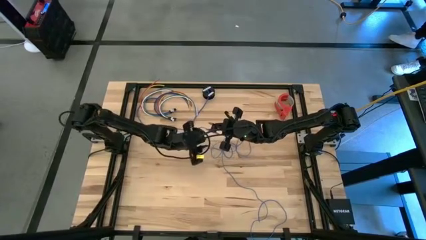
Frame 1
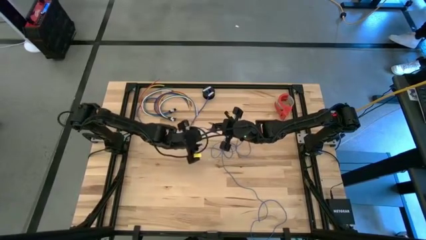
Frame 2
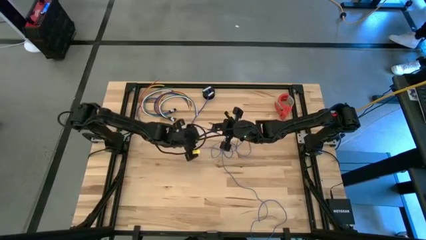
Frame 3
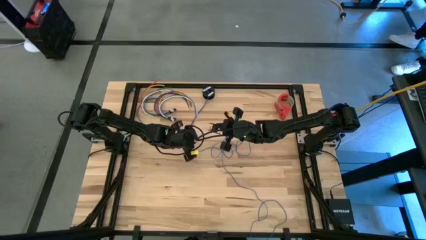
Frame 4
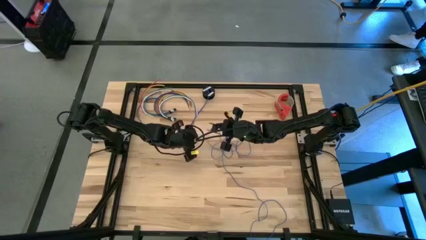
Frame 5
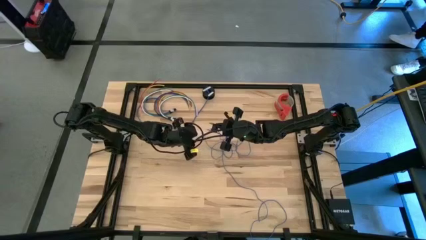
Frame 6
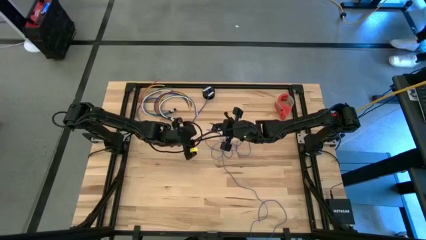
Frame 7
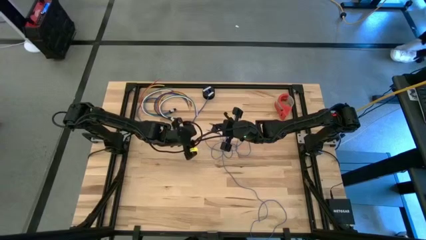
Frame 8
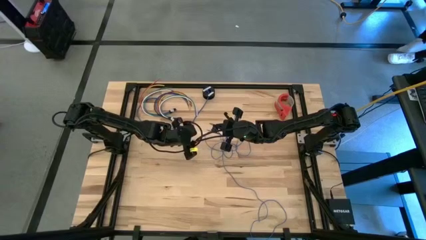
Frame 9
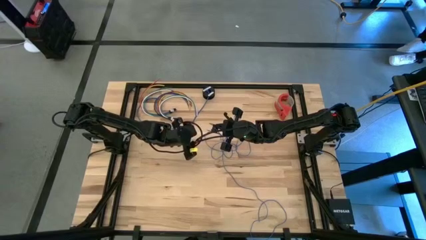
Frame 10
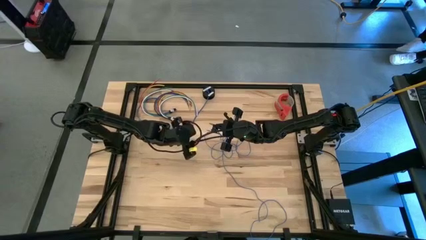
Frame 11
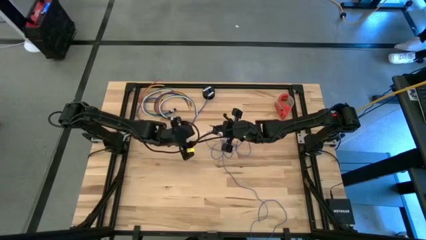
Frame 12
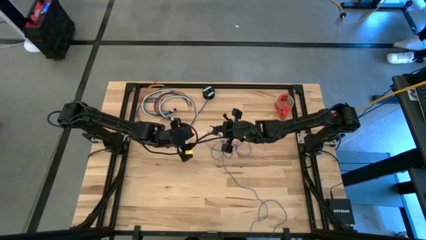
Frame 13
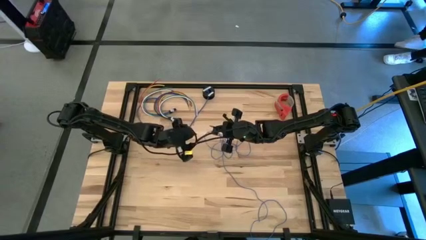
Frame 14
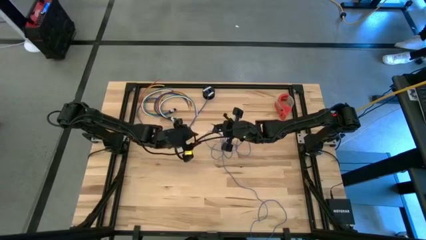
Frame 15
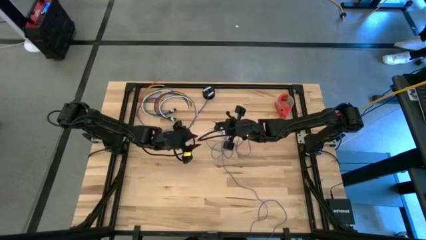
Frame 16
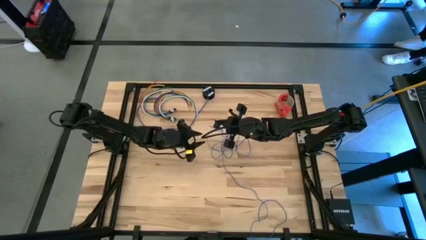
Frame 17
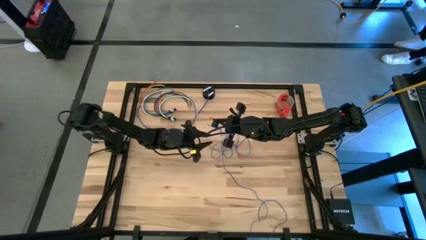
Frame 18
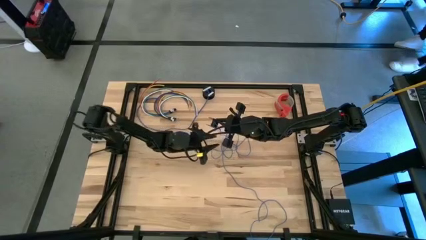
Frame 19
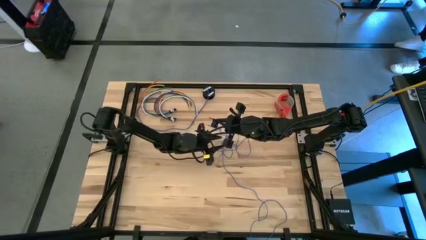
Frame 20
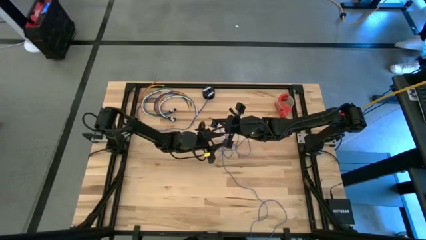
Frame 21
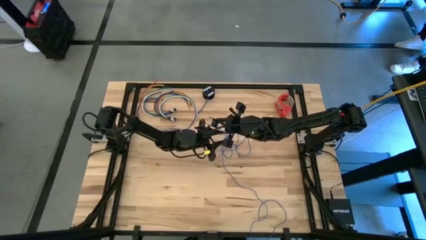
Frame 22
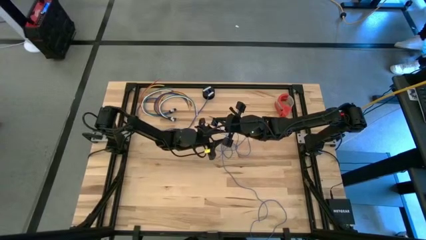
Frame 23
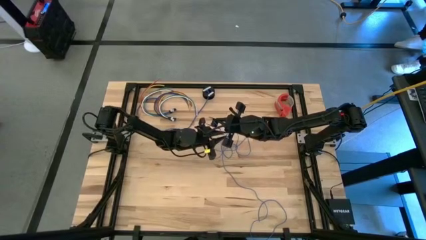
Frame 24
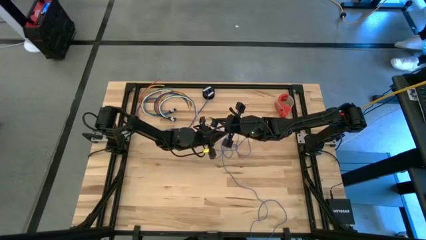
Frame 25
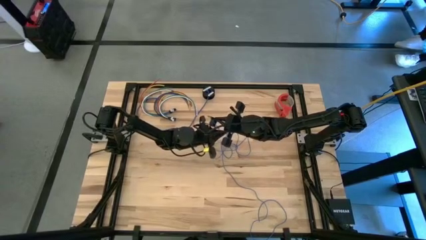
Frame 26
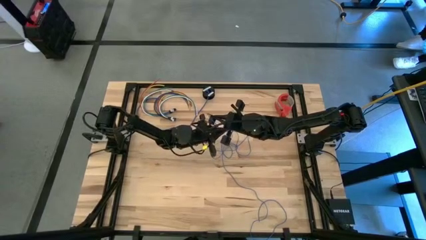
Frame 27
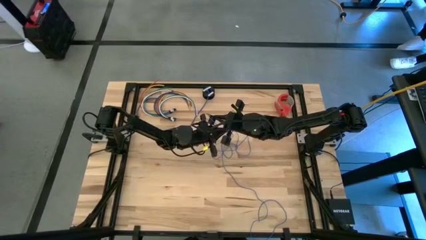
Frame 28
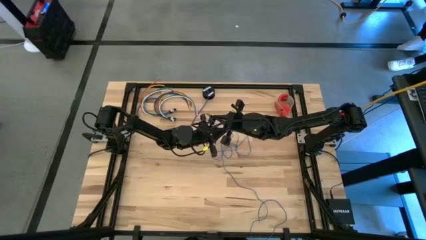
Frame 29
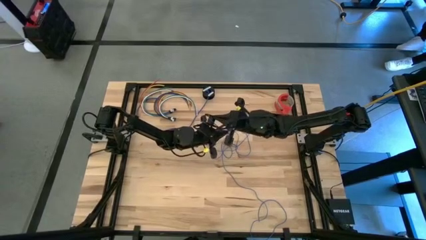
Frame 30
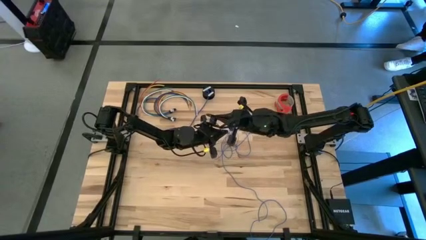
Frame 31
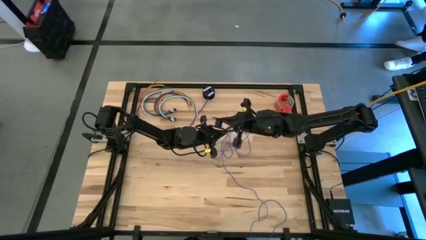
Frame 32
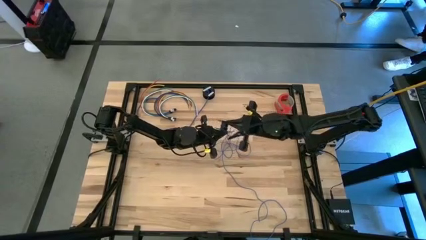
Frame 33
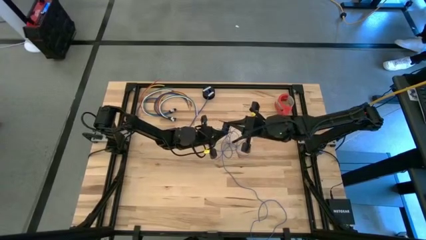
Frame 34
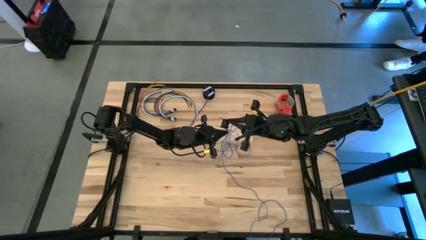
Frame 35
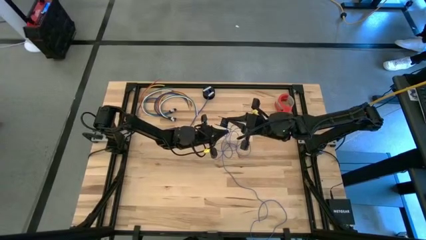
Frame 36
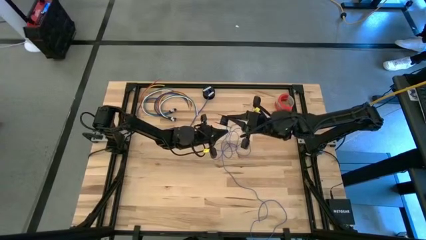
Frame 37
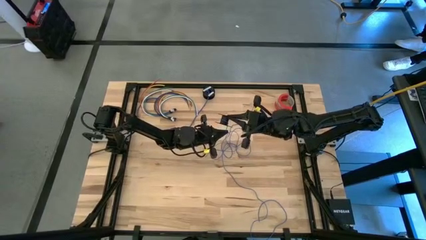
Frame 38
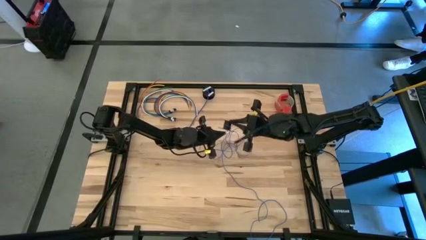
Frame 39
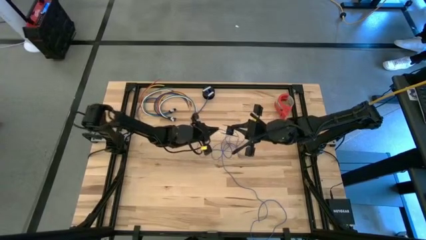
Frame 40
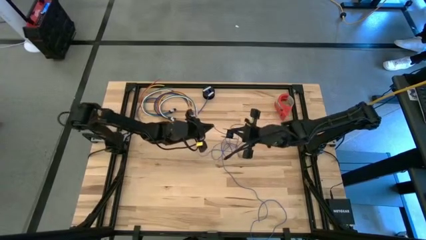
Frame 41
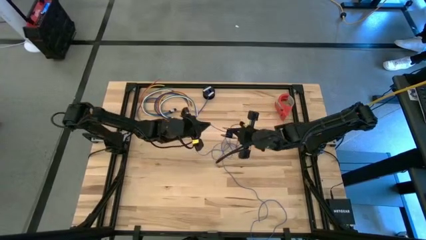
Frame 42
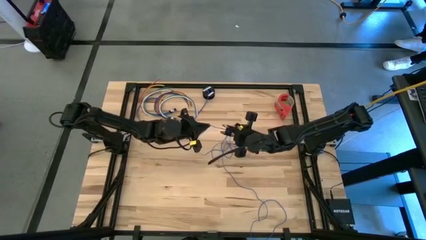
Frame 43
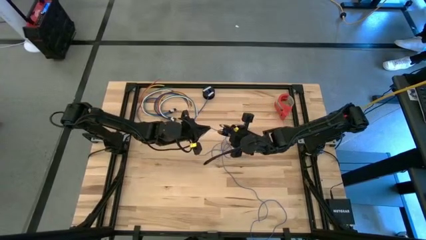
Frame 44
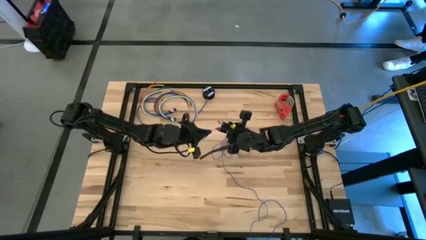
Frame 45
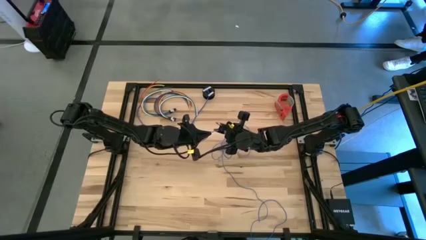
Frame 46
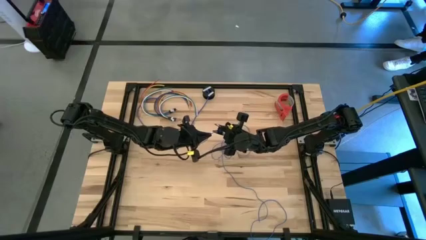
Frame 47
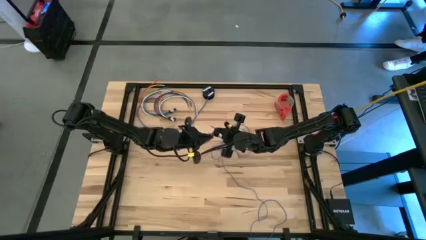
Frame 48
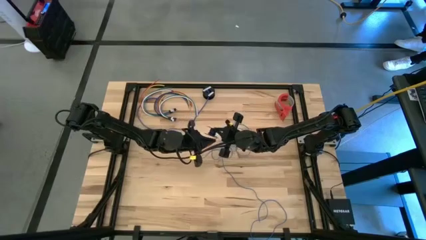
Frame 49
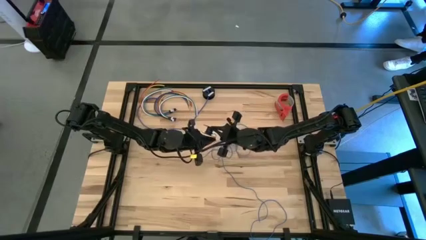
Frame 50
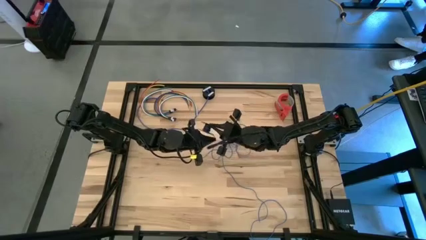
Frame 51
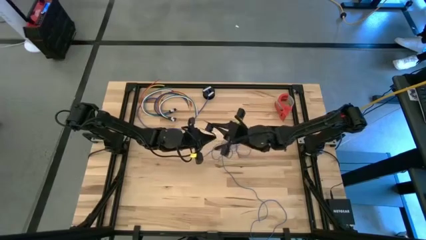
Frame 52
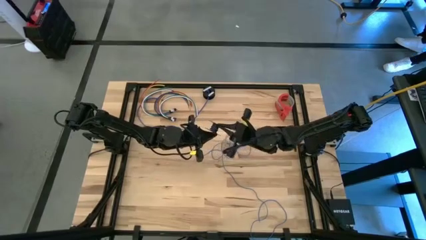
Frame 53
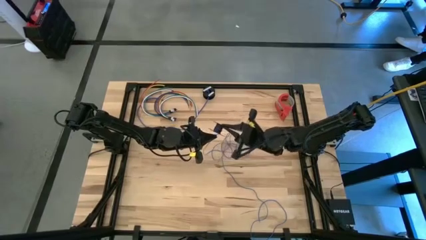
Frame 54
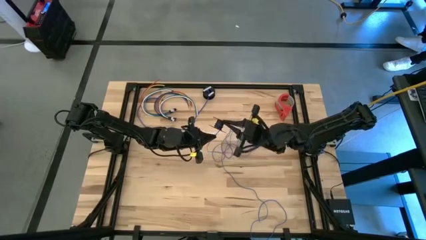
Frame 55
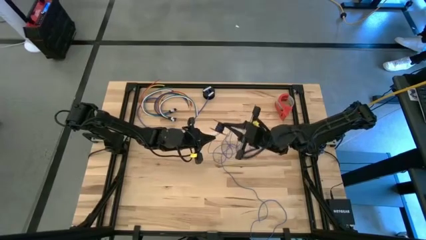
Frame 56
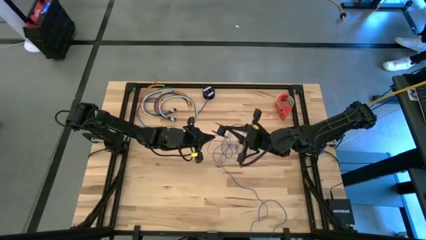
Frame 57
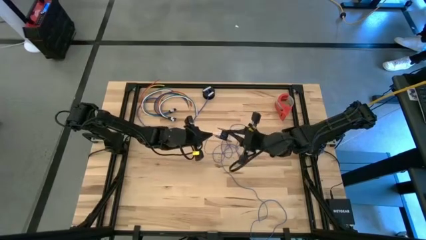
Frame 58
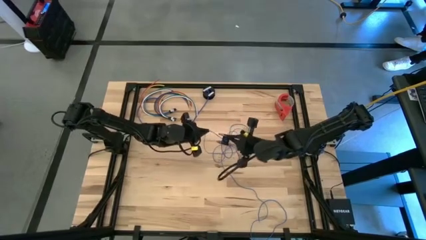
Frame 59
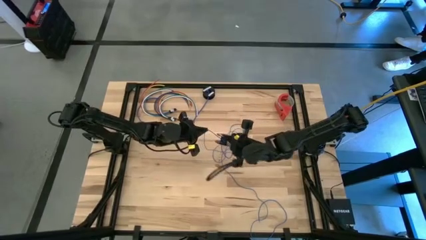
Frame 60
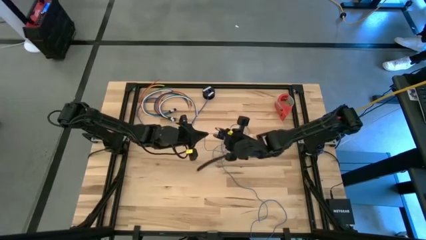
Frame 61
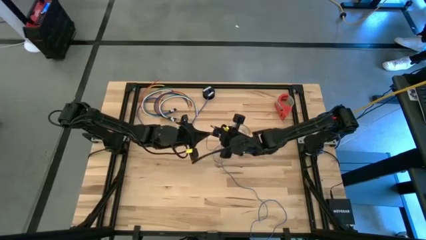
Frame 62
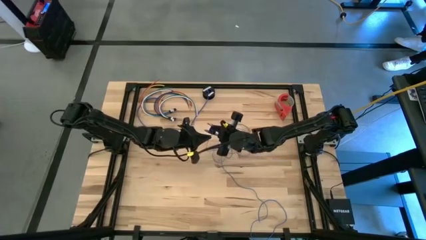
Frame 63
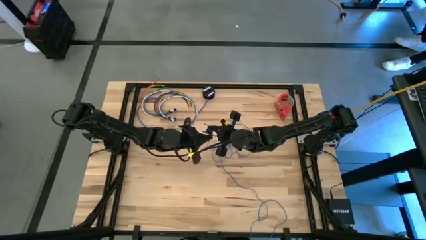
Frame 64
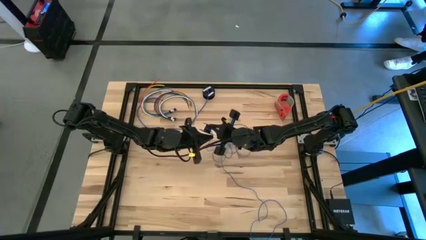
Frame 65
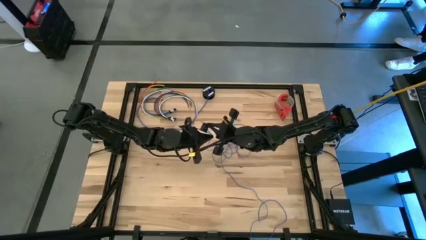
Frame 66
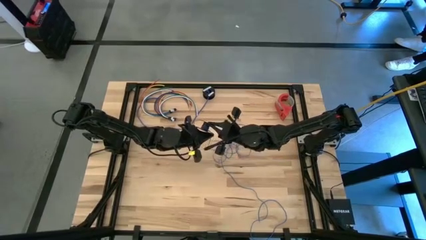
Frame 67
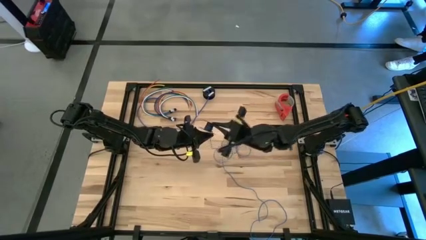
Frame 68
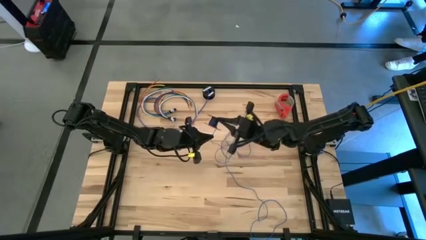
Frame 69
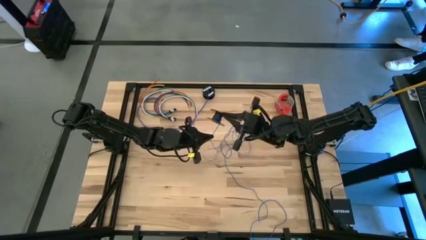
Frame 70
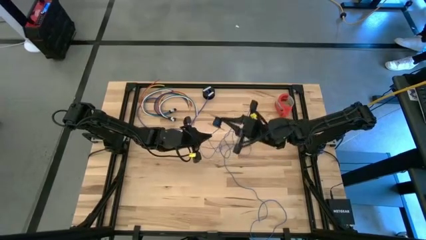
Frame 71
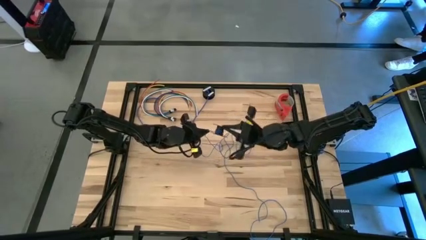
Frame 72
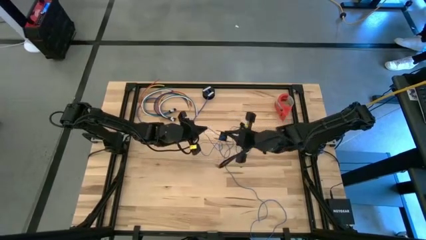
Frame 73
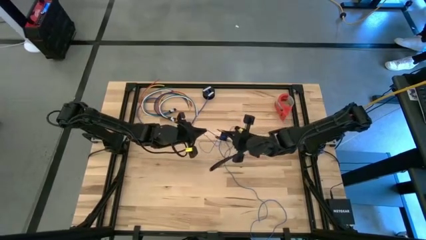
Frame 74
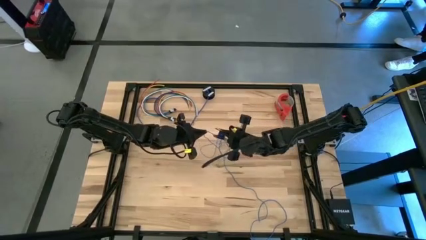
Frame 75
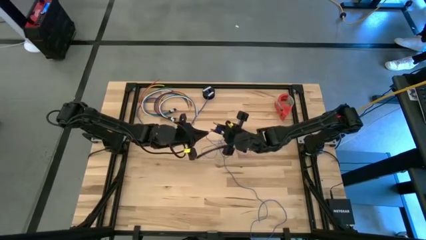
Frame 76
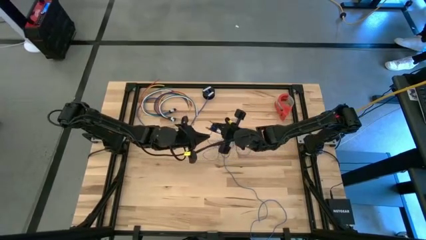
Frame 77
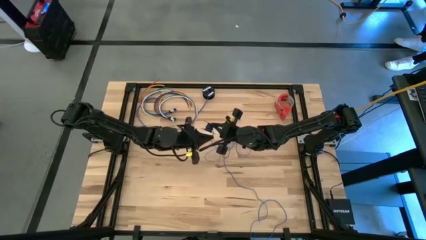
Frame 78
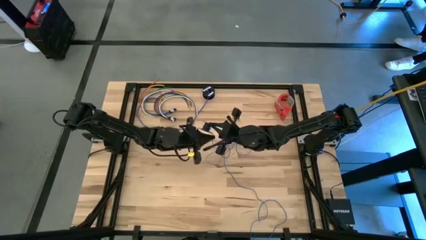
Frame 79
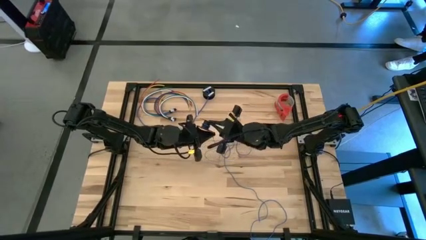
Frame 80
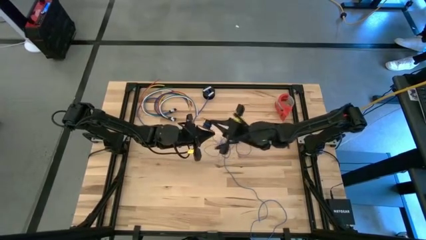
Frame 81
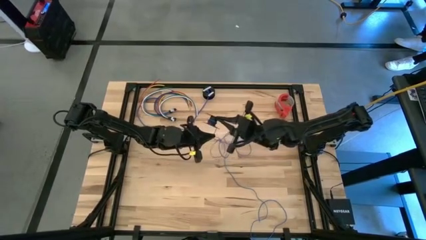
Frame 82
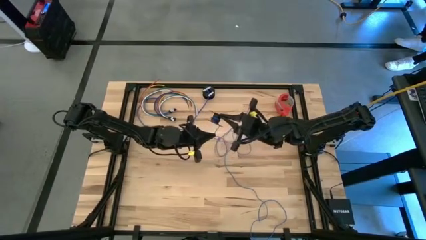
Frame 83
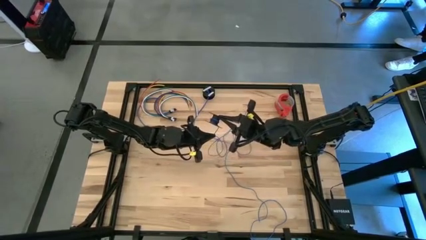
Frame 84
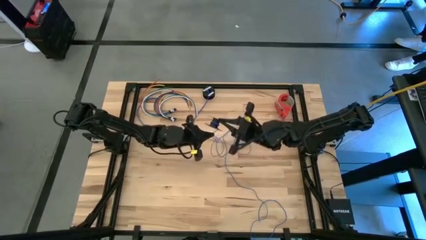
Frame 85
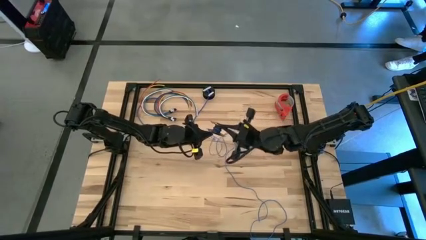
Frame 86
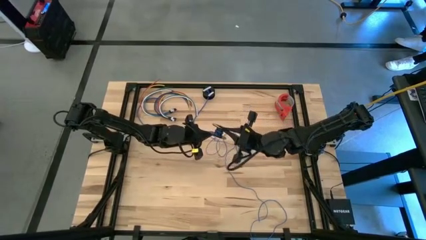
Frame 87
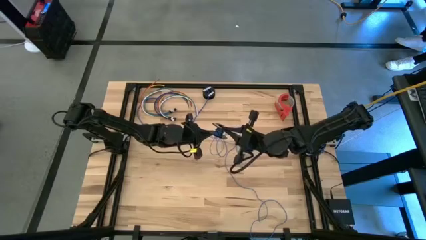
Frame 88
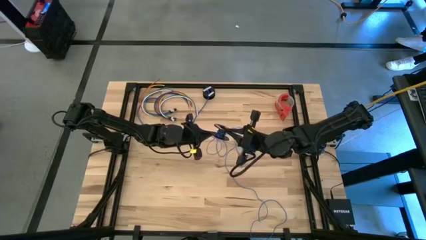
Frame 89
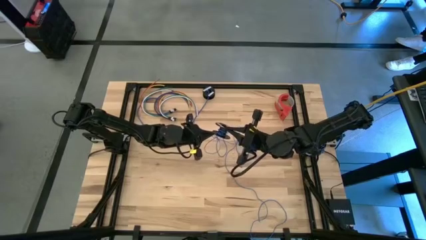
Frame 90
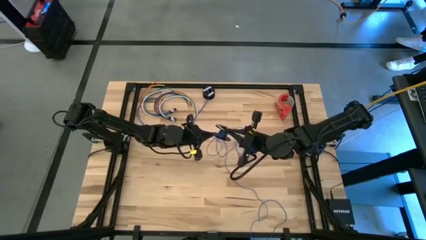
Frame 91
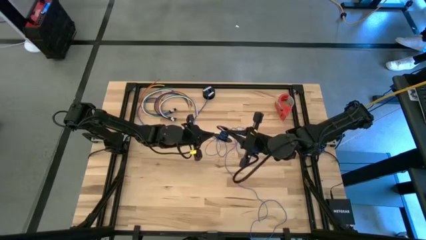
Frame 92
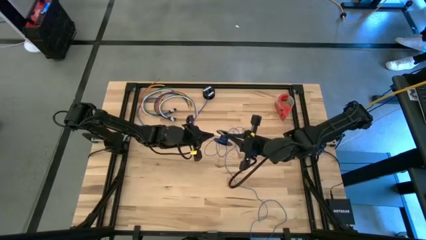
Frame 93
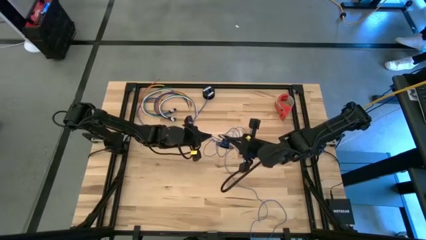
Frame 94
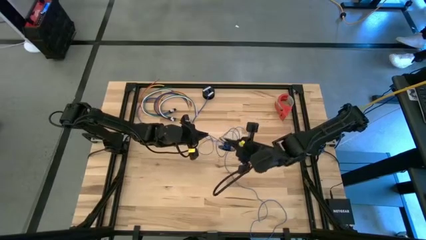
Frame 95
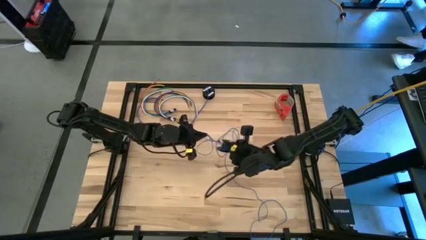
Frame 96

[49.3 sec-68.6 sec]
Task: Coil cords
Coil the blue wire onto the black spool
